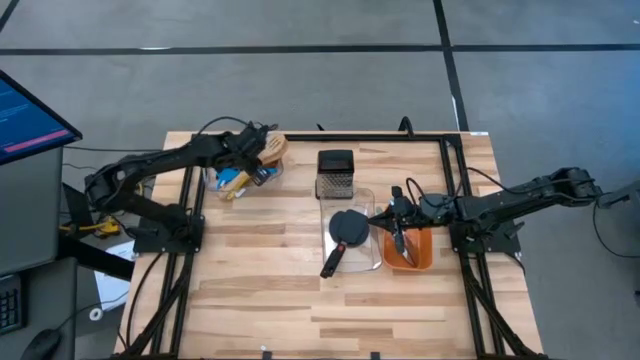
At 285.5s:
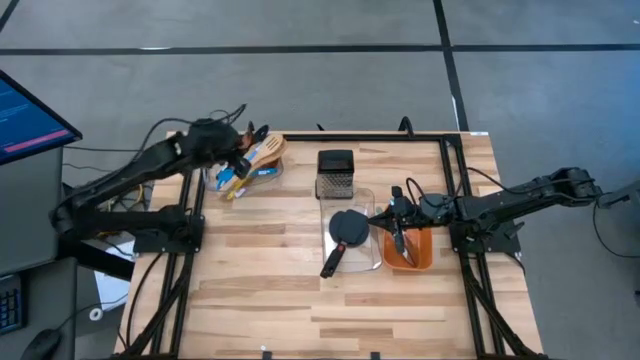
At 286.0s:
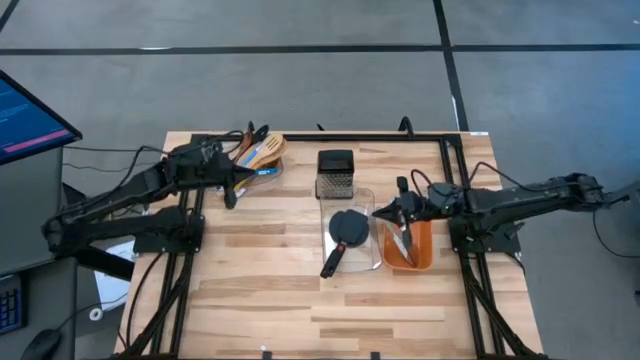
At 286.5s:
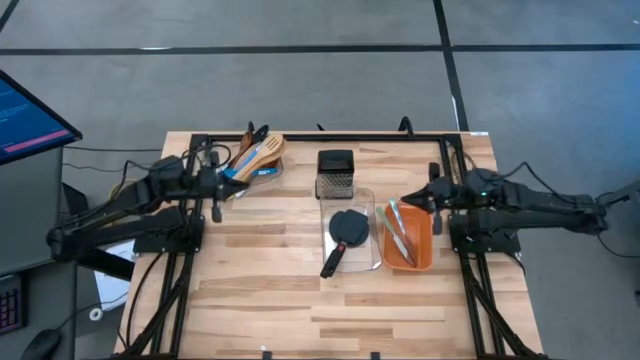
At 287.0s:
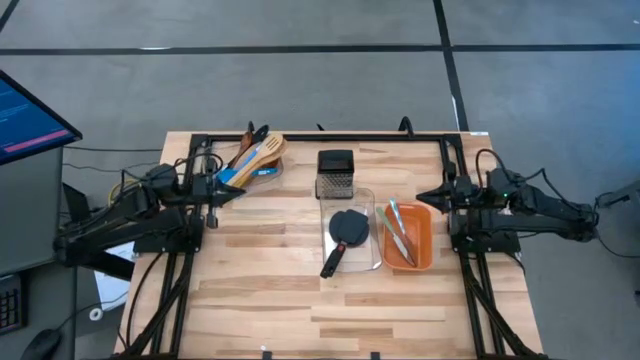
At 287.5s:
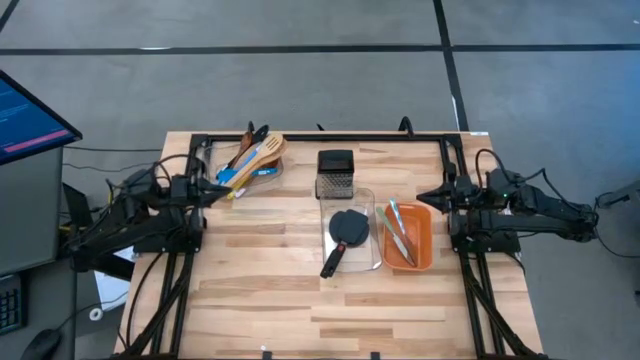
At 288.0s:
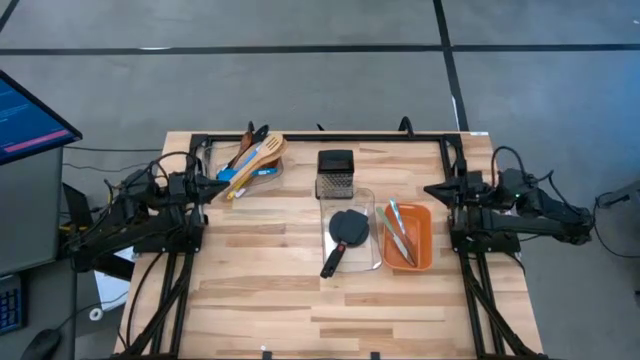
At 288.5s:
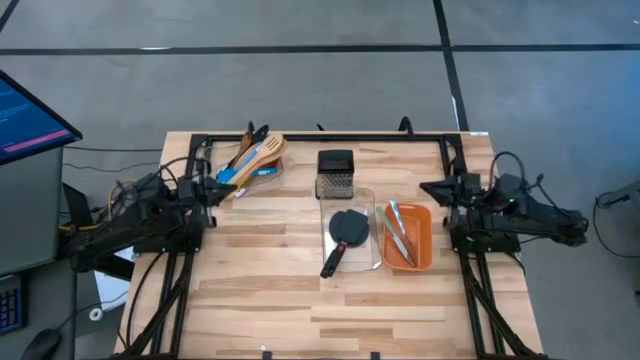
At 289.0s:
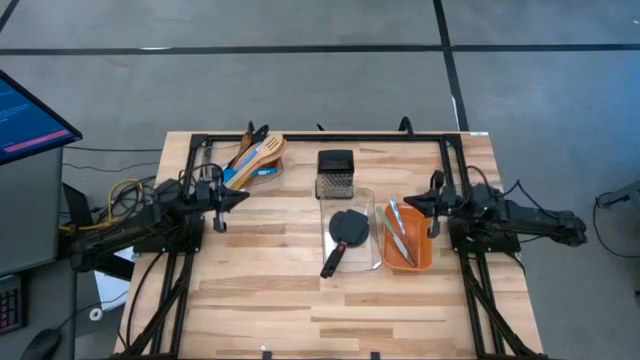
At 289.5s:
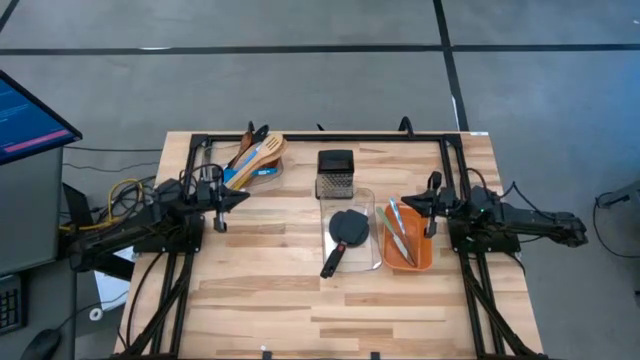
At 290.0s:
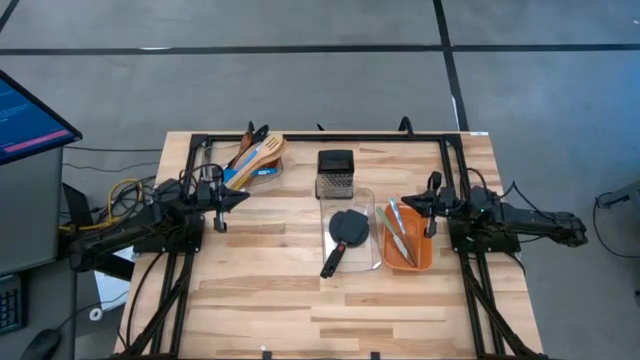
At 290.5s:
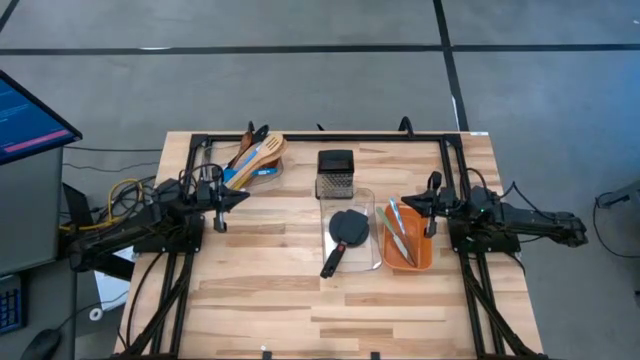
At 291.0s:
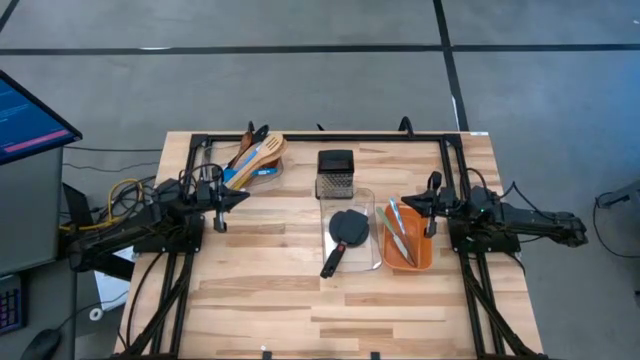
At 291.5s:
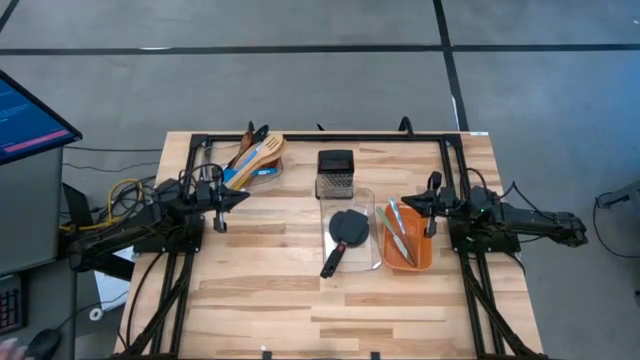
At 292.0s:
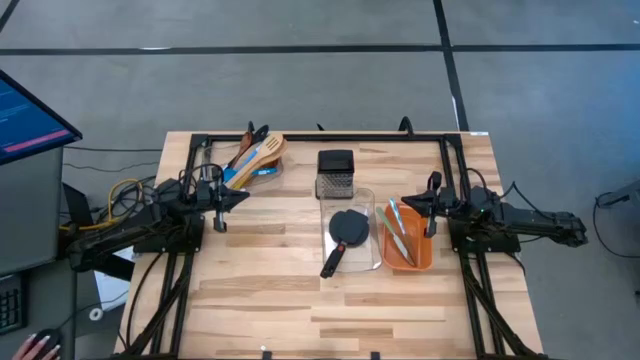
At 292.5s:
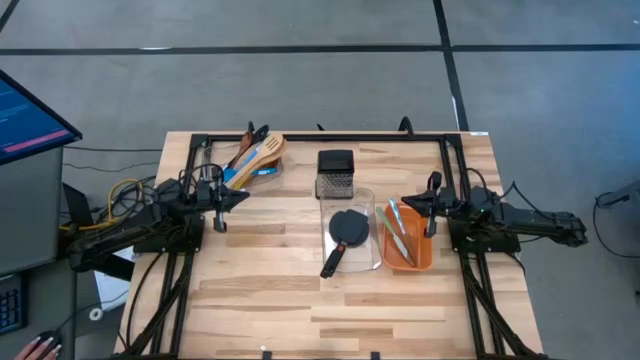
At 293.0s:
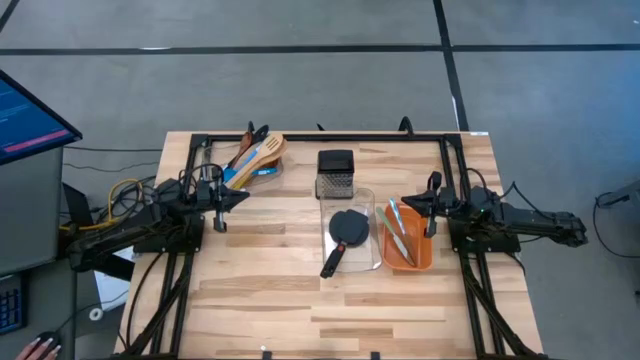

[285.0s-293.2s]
Task: Pick & Place Kitchen Items
Return to Home Position

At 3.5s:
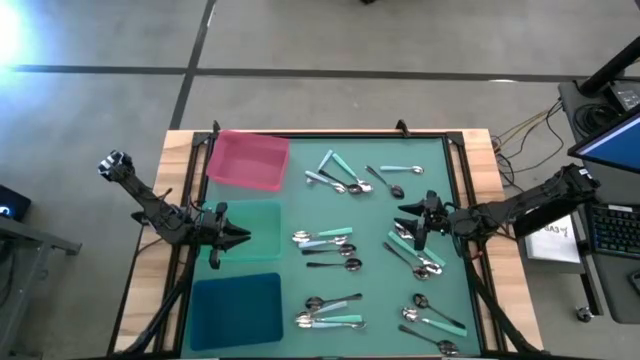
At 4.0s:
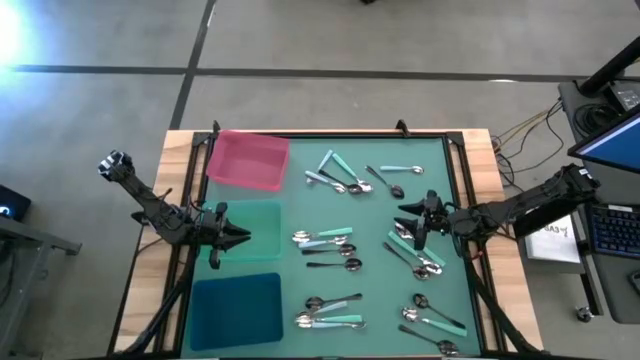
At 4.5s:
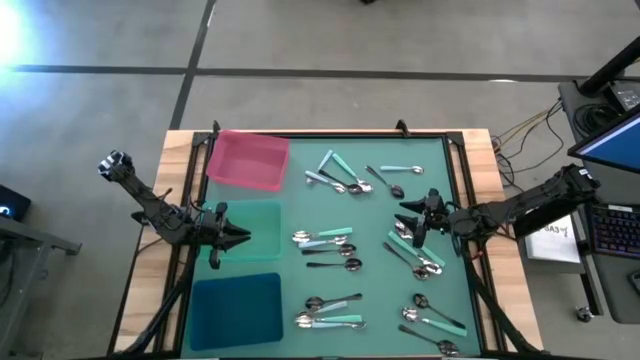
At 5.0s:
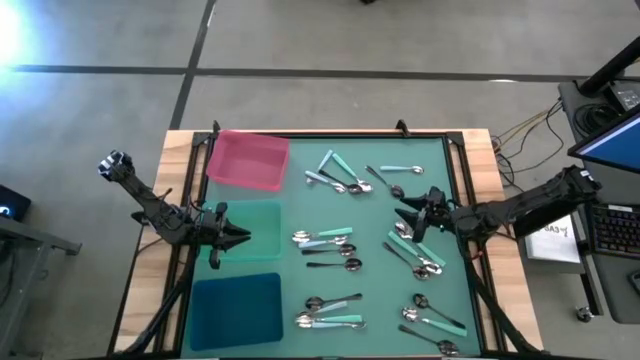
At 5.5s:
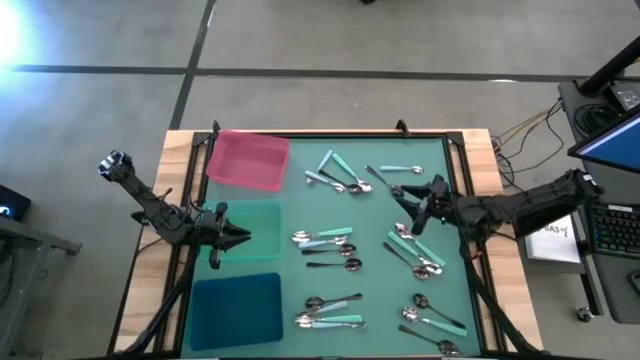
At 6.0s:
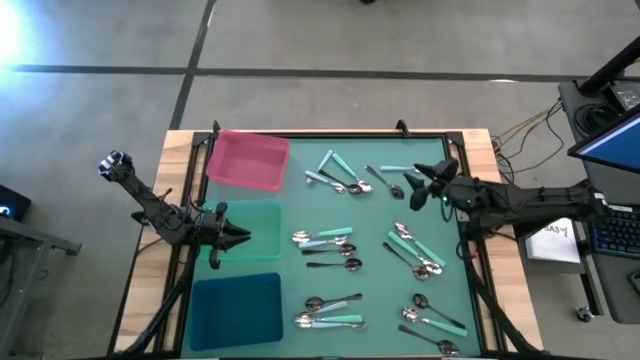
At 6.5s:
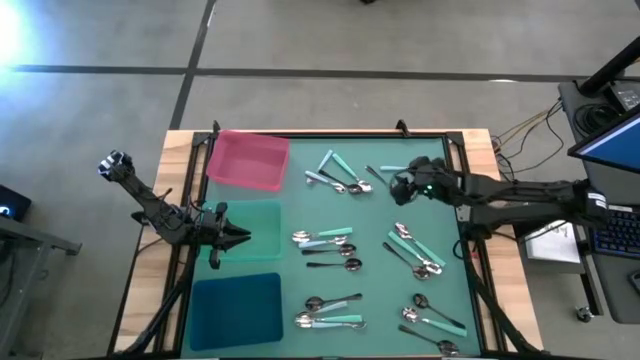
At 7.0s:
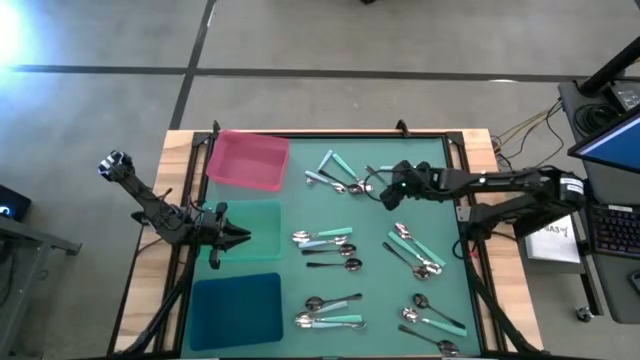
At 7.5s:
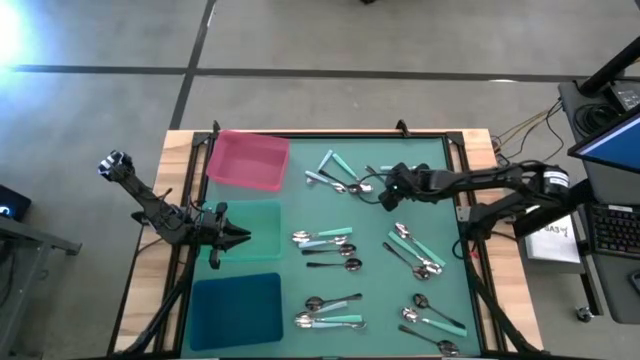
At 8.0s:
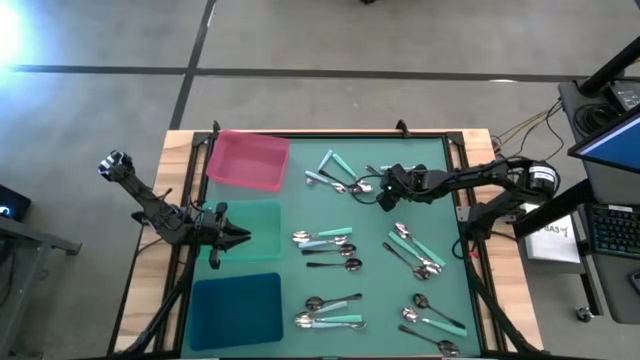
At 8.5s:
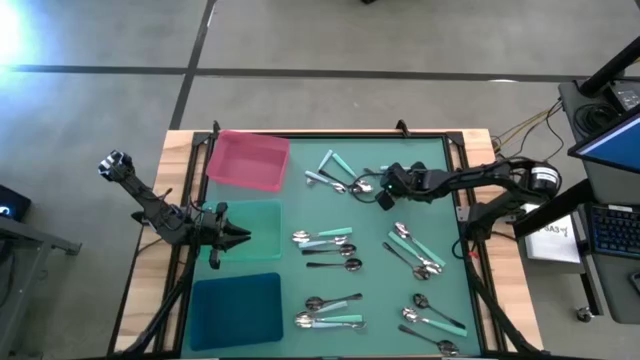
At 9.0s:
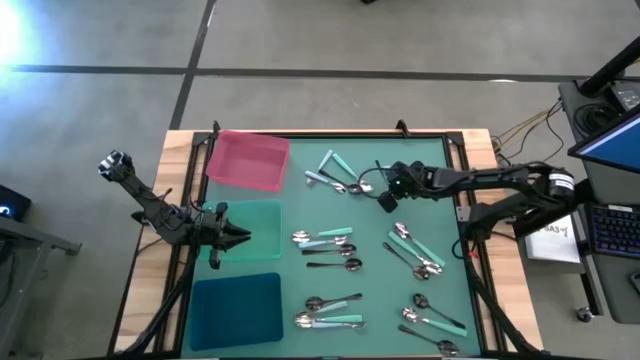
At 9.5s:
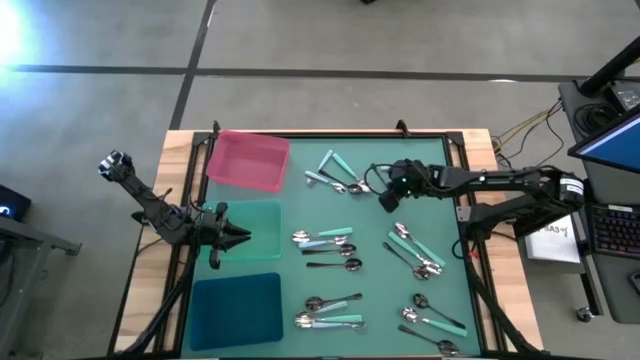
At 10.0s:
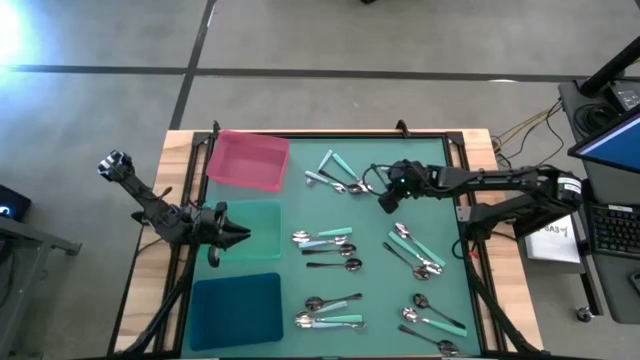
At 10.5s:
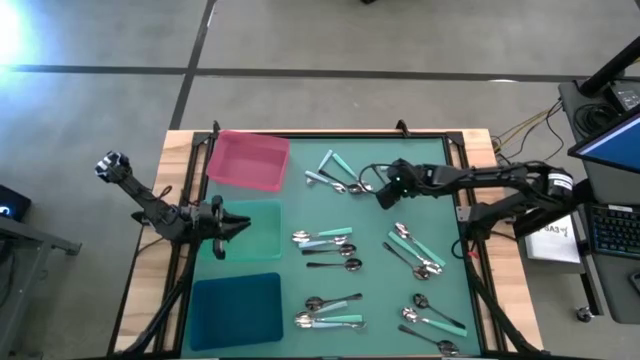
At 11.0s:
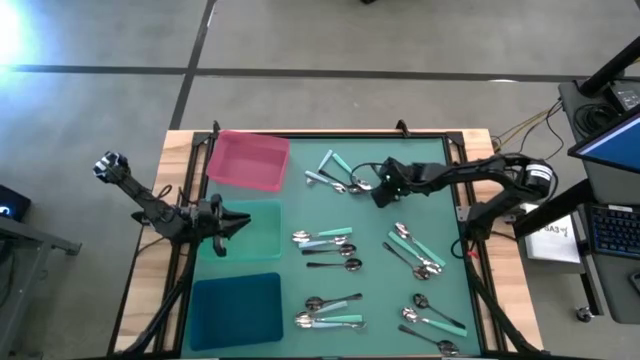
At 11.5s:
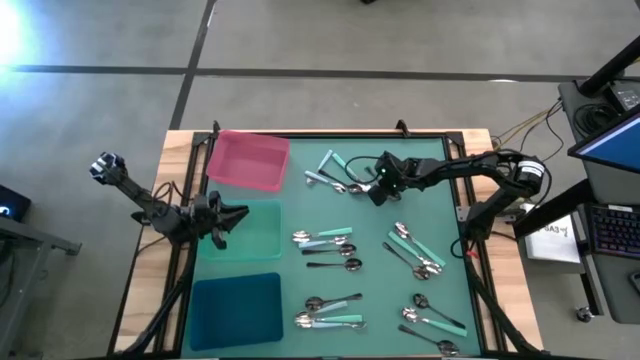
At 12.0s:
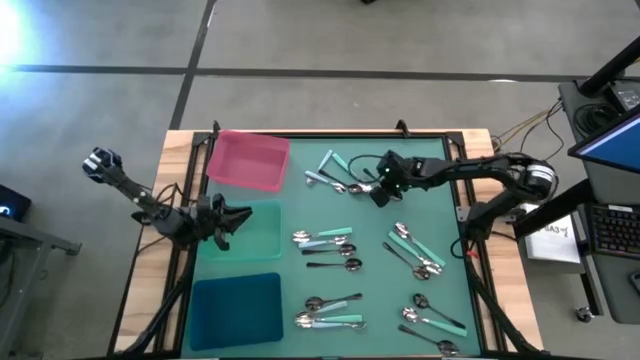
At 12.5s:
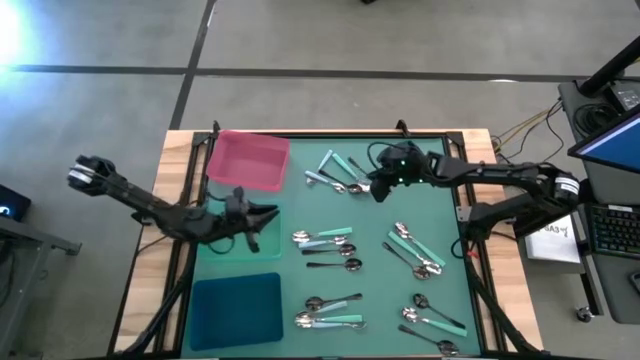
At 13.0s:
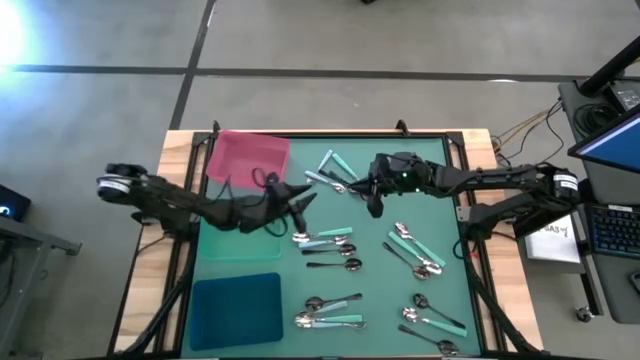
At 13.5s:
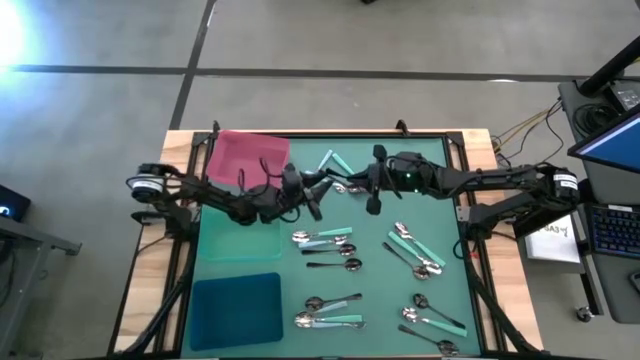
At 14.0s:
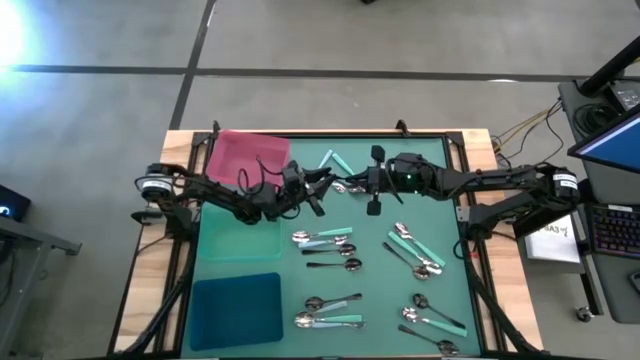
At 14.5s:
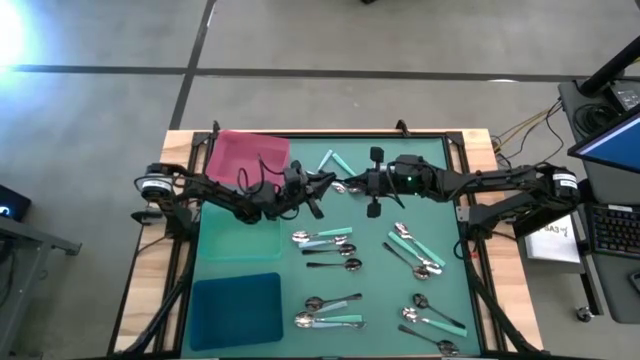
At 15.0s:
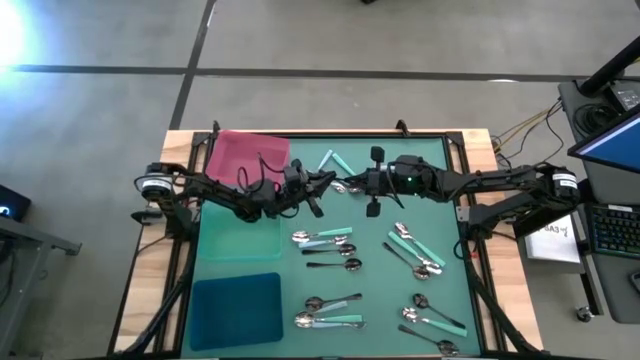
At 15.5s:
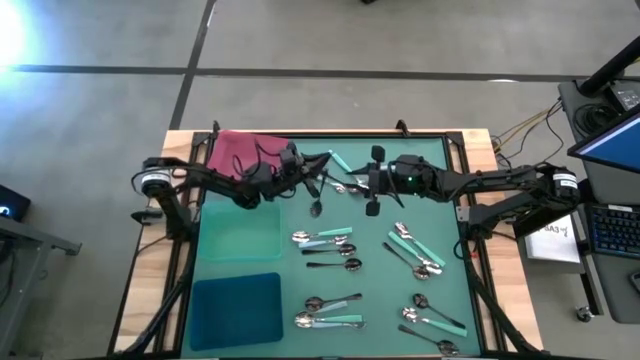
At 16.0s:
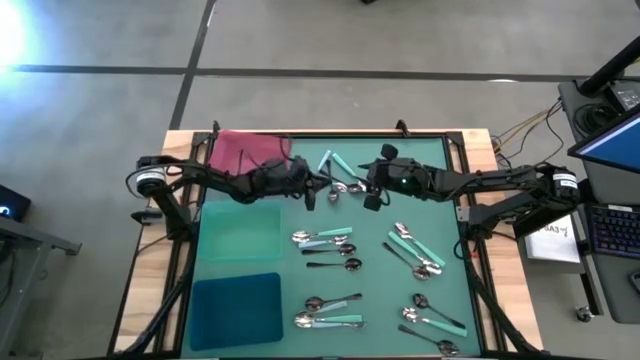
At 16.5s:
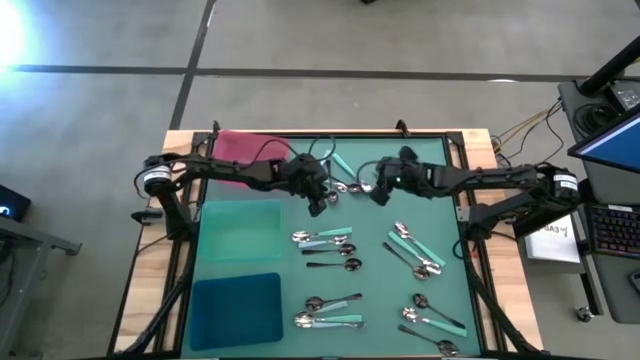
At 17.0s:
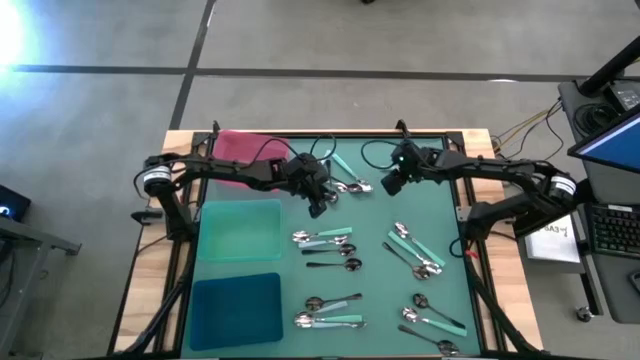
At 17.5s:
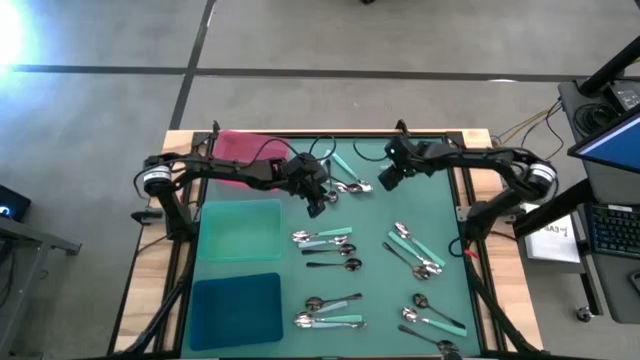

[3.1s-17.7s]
Task: Sort silverware by color (type)
Put the black spoon into the green bin
